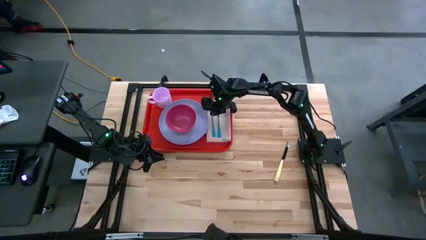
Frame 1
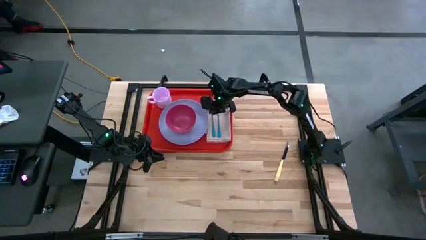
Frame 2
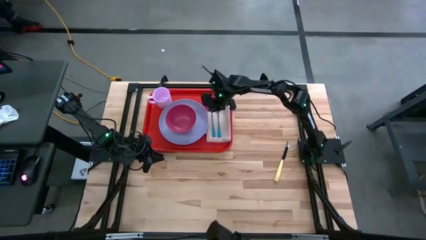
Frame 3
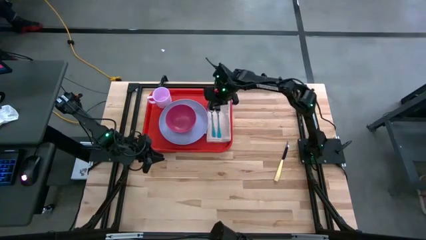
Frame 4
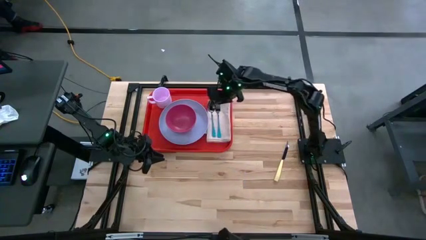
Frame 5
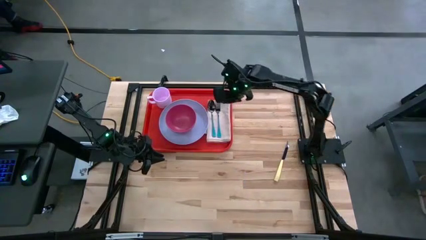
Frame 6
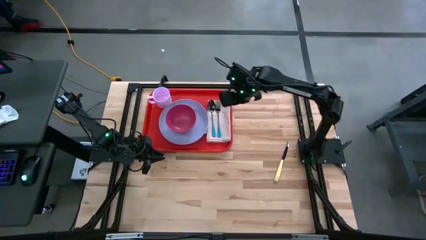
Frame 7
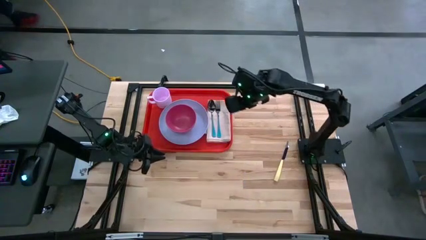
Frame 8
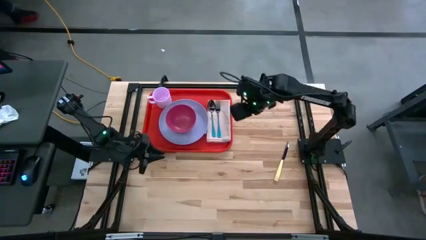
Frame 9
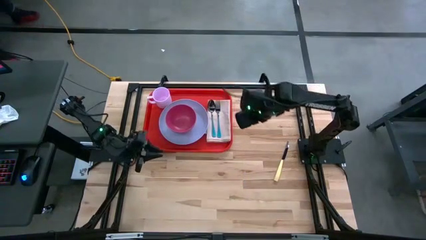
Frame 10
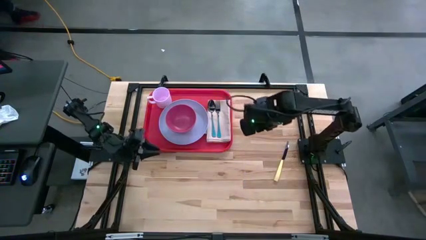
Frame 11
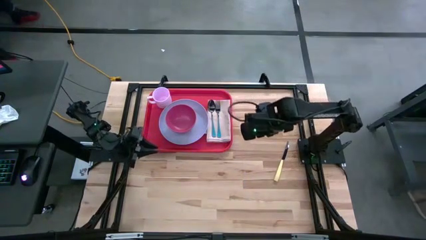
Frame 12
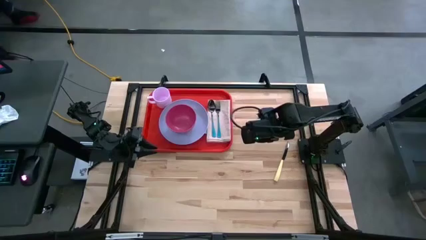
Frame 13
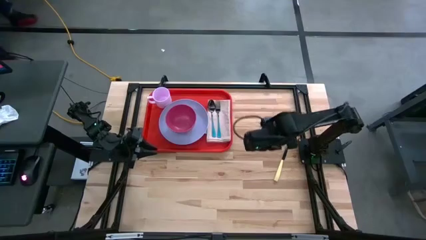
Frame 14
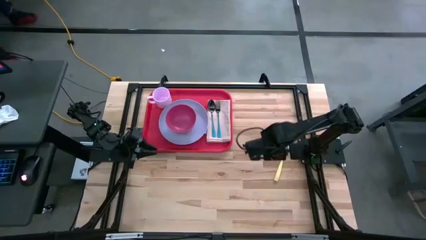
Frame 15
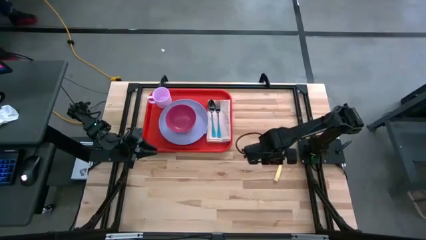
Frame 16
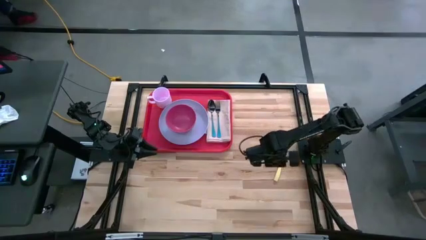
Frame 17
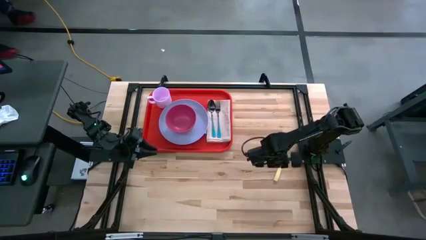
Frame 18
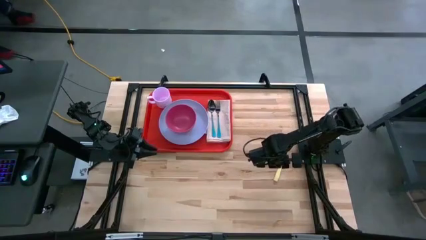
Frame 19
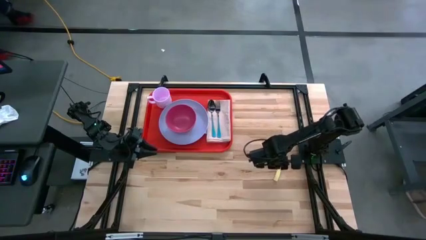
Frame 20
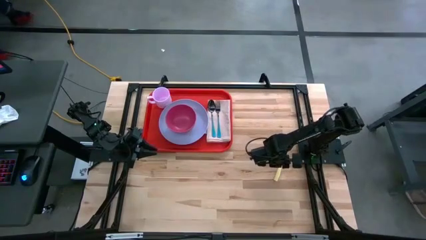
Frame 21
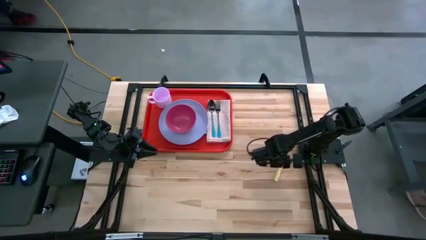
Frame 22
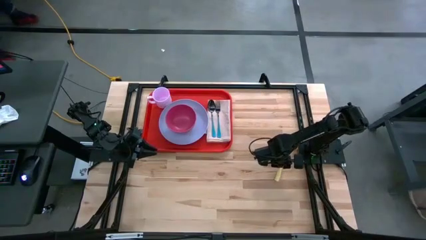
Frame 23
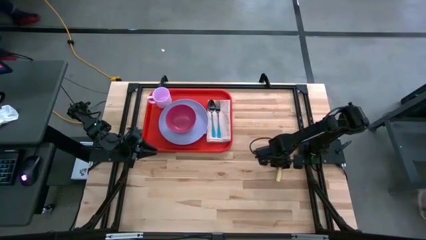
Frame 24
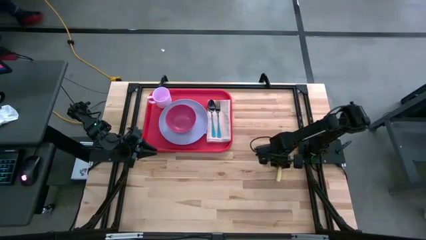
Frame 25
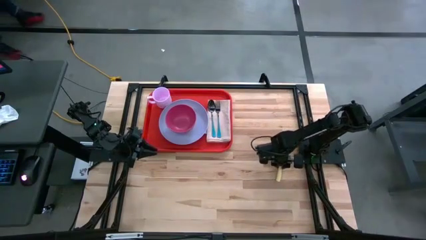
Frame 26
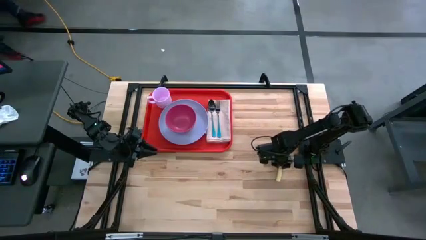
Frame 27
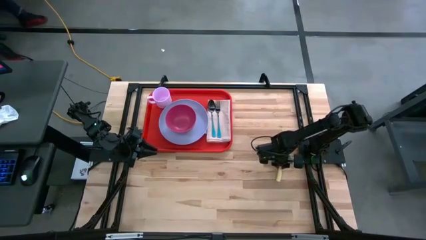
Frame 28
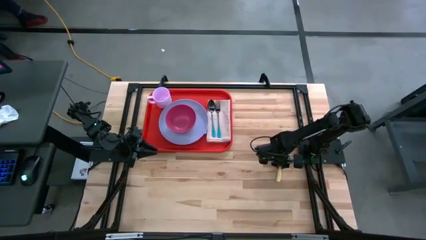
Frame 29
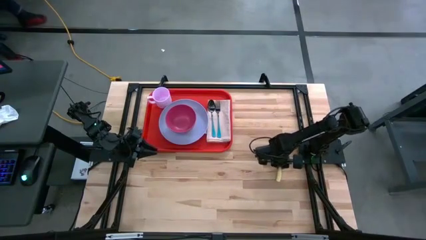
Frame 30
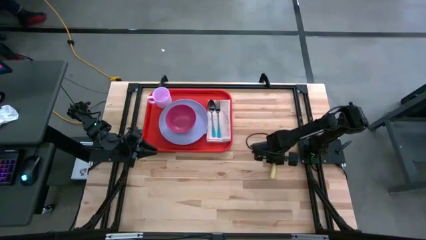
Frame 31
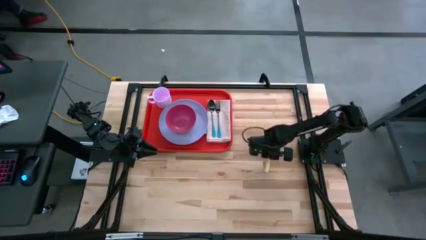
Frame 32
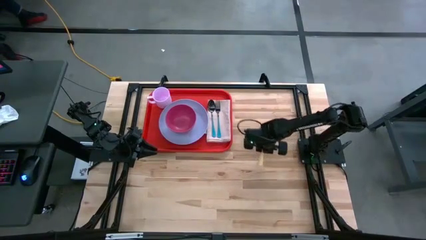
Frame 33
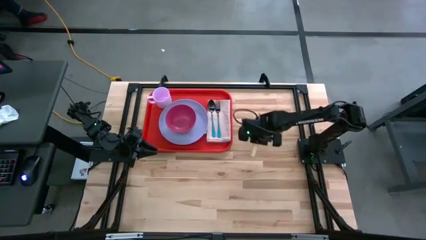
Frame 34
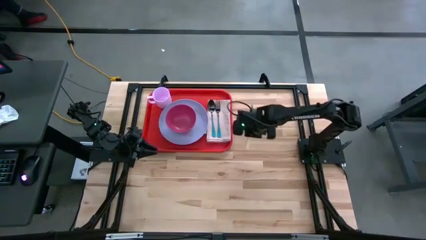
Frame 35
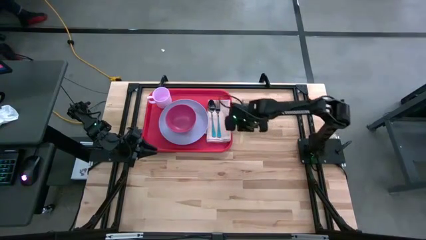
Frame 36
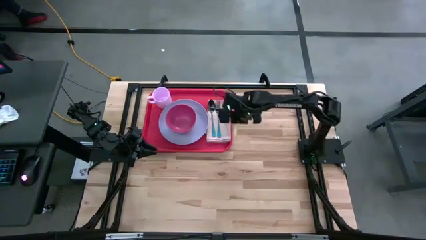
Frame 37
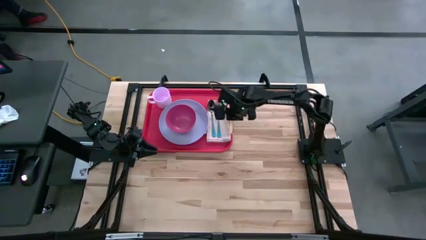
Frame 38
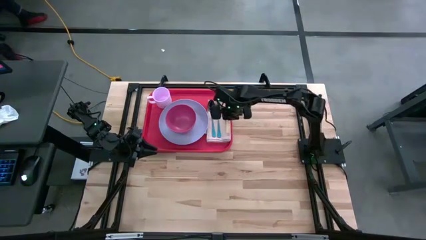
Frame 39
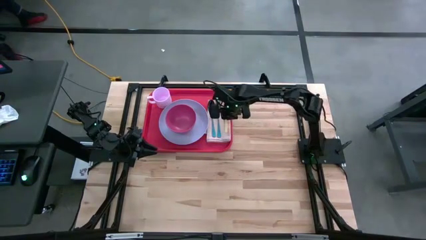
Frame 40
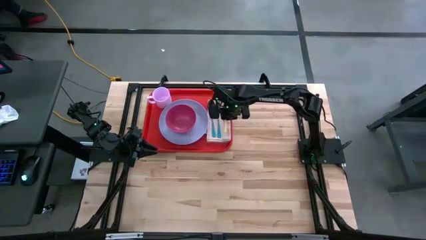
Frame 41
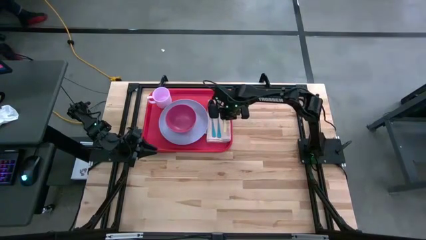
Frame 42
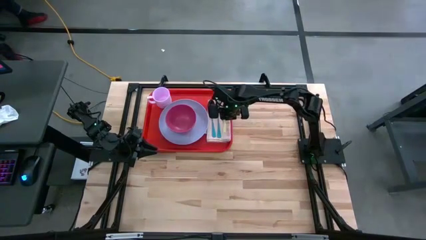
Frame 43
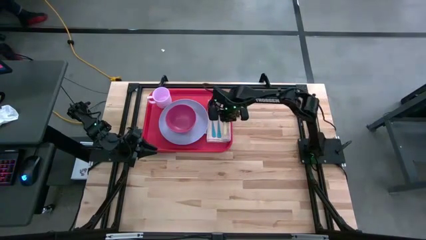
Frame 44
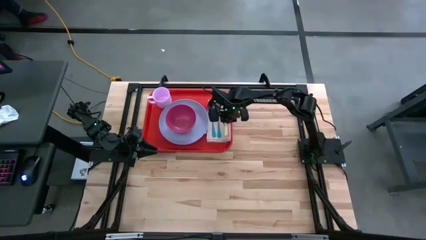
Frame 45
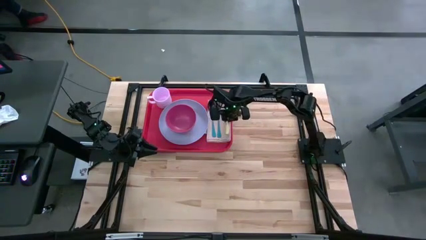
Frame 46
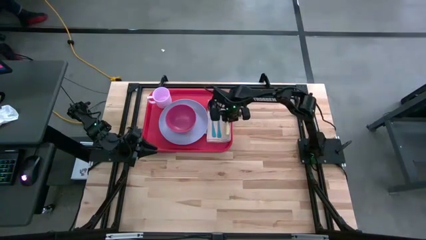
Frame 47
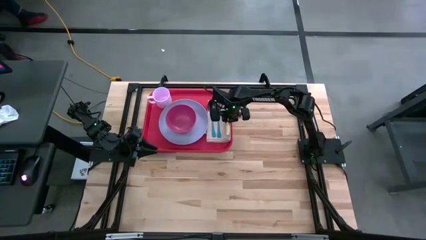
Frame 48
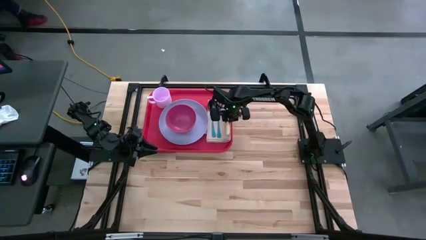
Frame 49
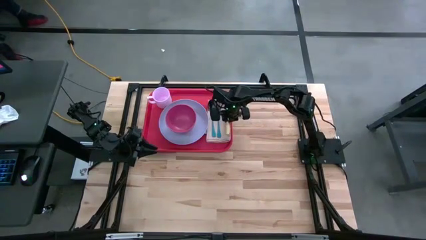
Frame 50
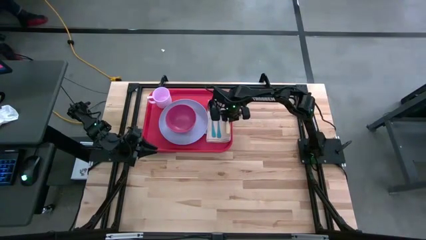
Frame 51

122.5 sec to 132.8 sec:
Task: Set up tray
Put the yellow knife on the brown napkin beside the blue fork on the red tray

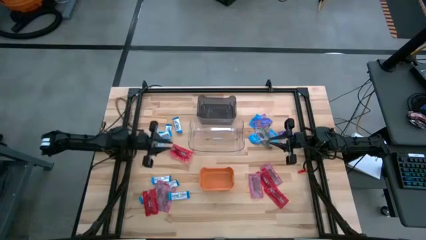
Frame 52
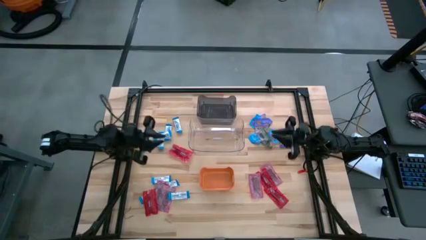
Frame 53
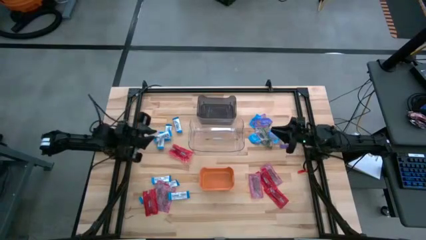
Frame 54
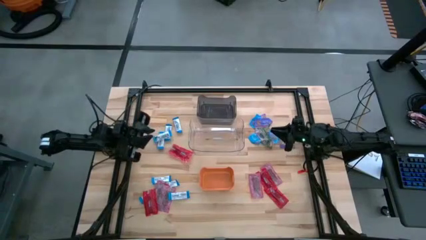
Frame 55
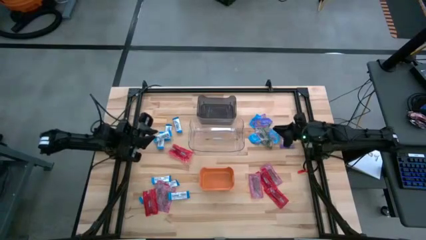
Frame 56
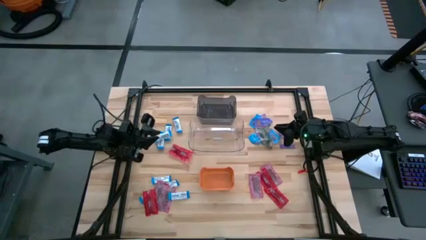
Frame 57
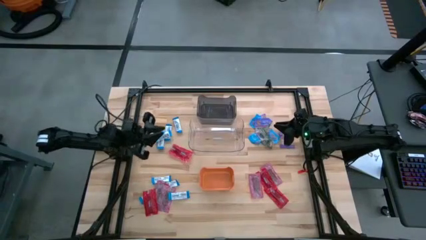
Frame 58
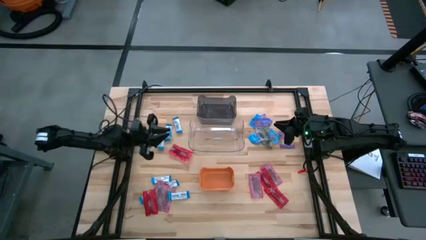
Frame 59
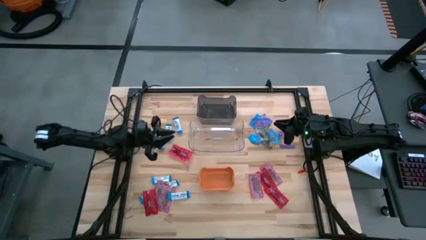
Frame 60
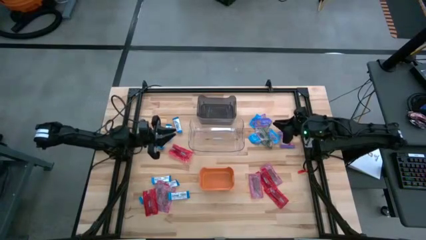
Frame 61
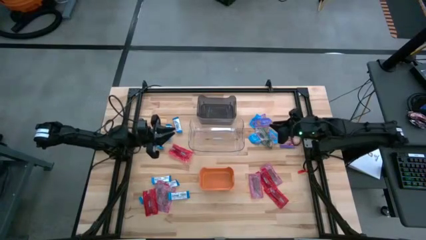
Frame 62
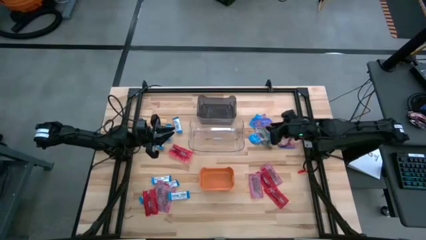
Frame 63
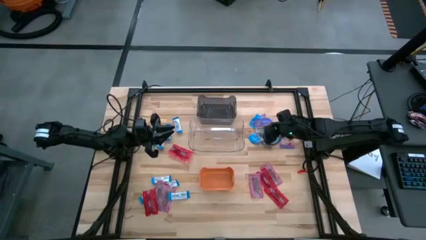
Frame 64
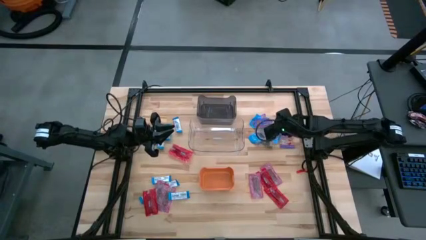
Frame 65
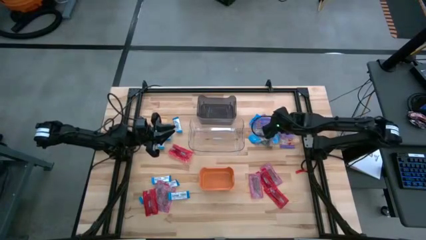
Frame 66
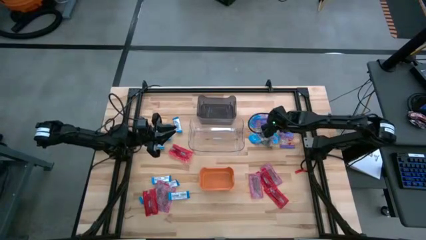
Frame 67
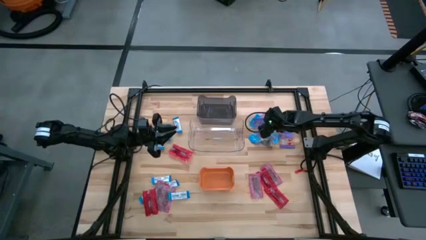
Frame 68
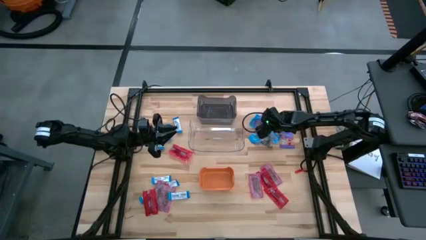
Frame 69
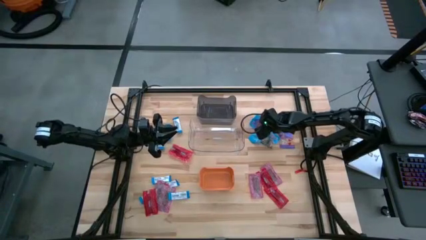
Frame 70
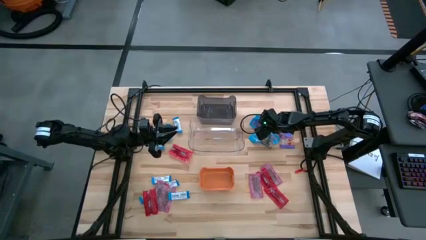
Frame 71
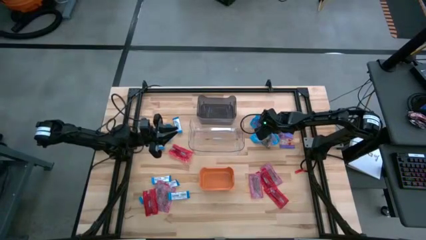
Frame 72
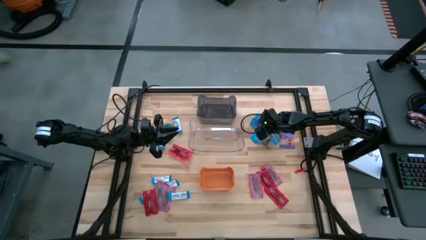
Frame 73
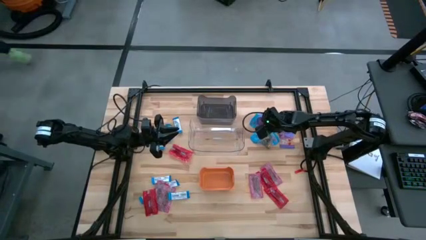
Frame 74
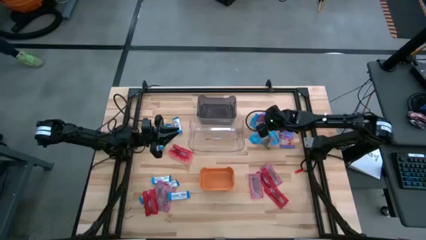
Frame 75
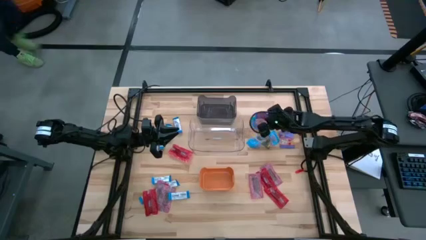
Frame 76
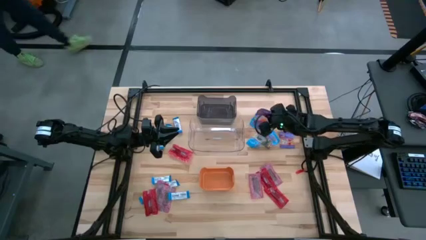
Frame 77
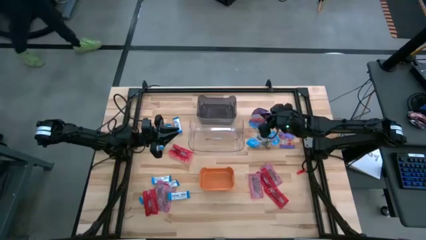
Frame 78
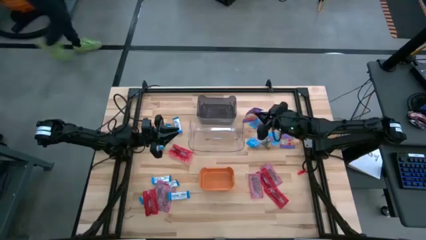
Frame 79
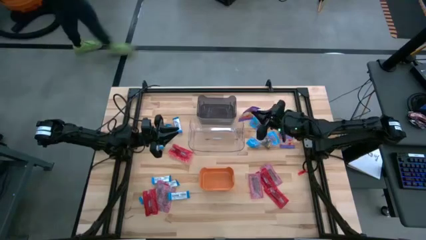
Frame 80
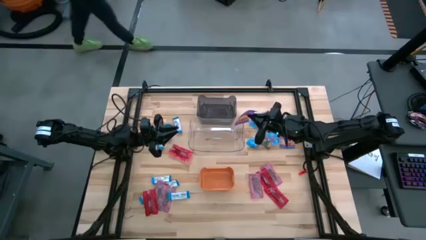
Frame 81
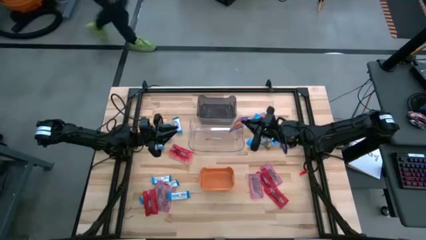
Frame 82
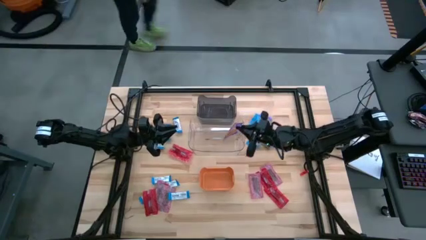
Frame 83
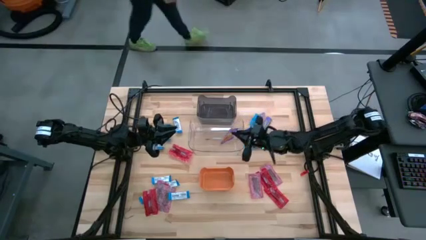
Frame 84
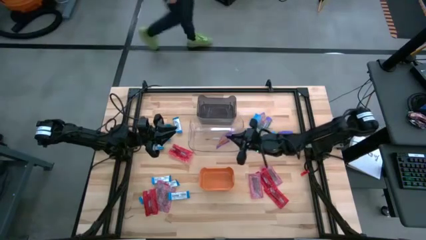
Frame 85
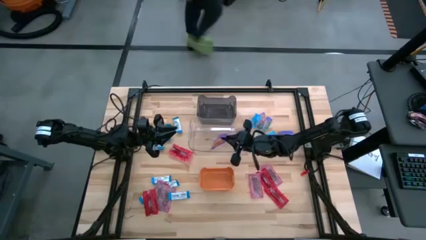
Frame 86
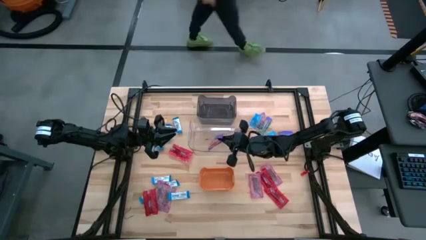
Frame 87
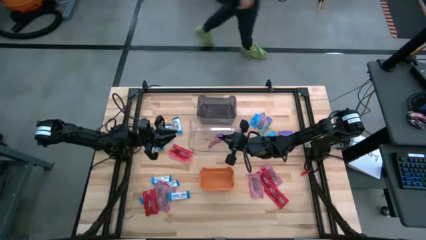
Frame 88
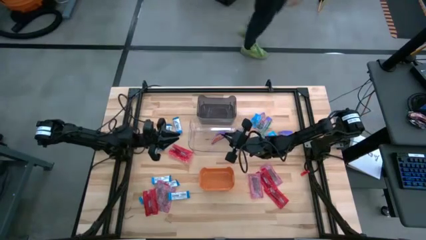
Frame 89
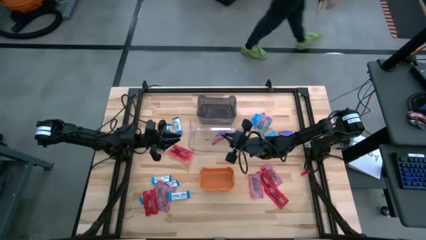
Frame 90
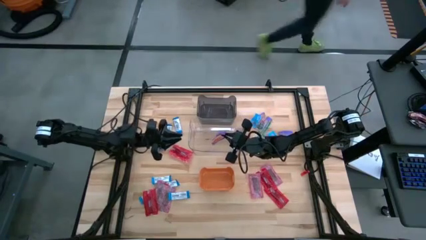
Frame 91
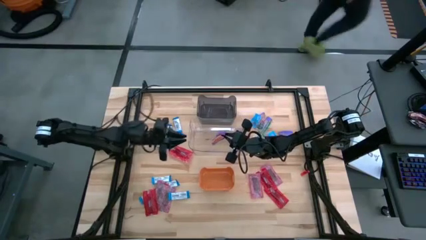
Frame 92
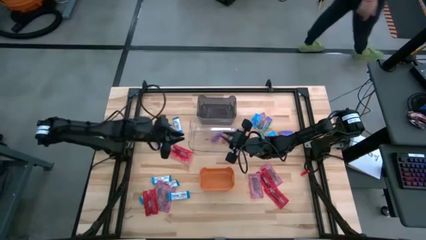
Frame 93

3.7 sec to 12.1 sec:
Task: Sort candy
Put the blue candy into the clear transparent bin
